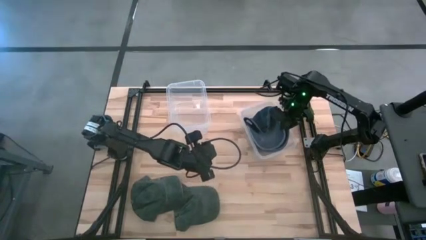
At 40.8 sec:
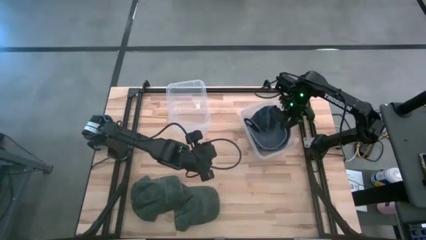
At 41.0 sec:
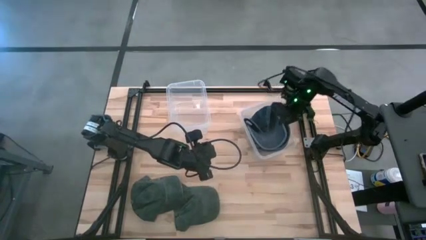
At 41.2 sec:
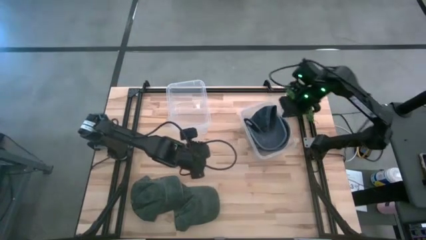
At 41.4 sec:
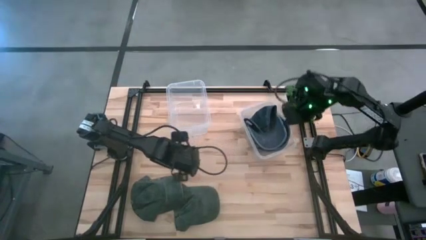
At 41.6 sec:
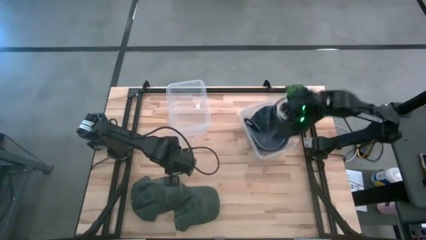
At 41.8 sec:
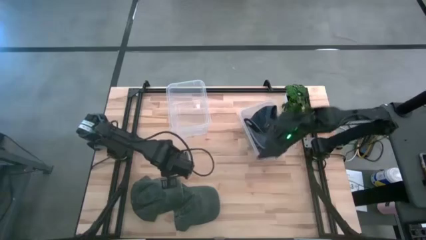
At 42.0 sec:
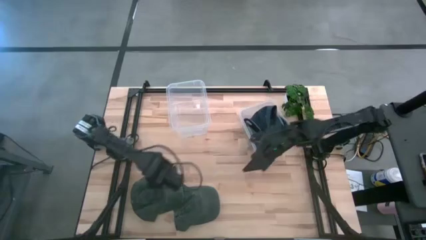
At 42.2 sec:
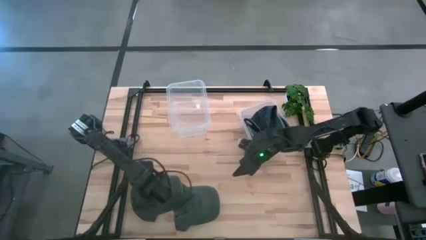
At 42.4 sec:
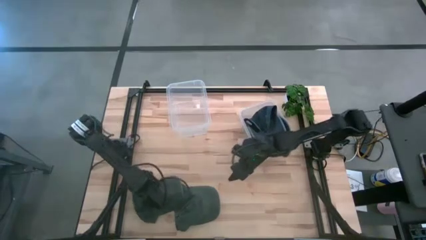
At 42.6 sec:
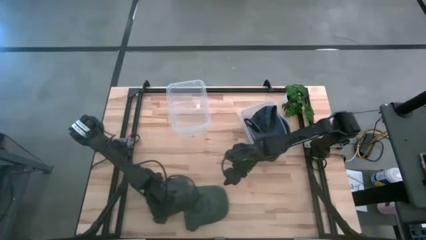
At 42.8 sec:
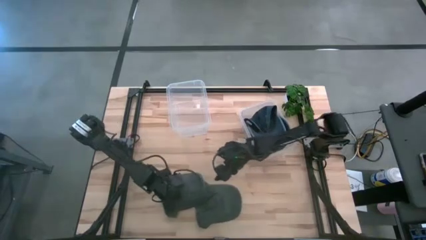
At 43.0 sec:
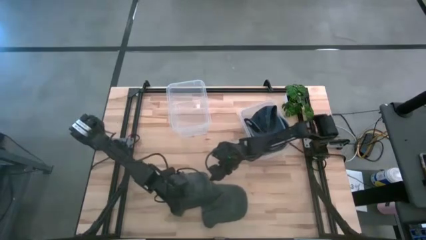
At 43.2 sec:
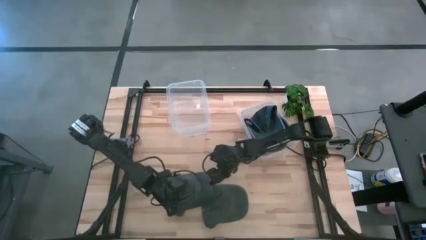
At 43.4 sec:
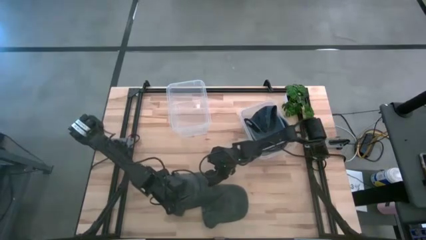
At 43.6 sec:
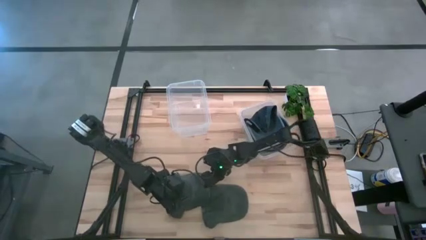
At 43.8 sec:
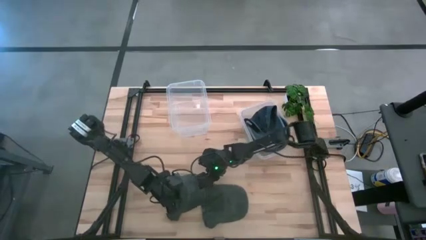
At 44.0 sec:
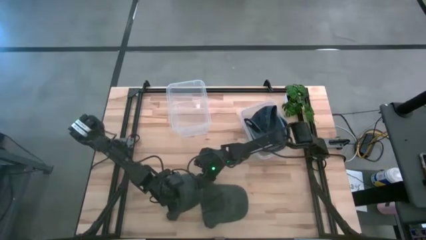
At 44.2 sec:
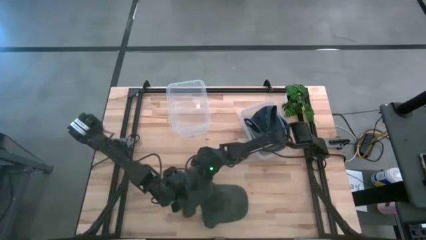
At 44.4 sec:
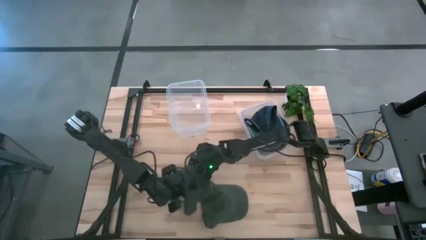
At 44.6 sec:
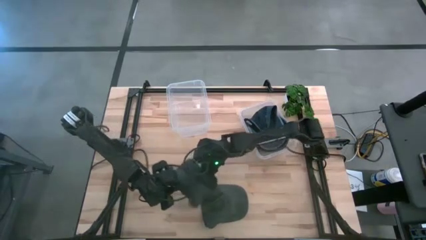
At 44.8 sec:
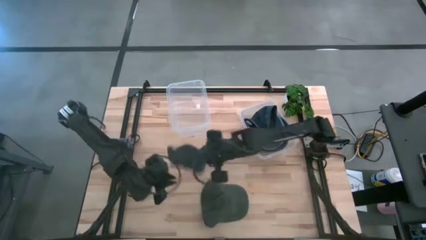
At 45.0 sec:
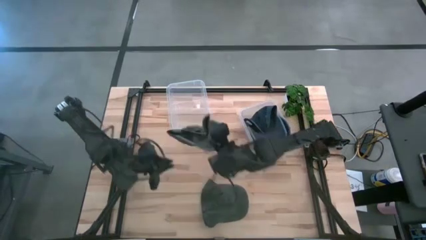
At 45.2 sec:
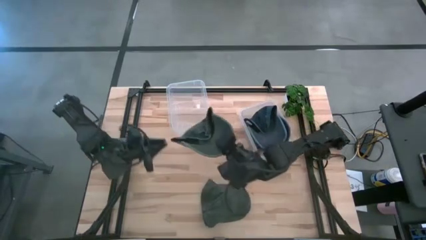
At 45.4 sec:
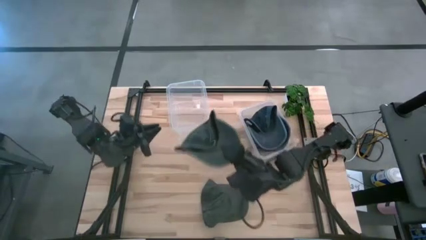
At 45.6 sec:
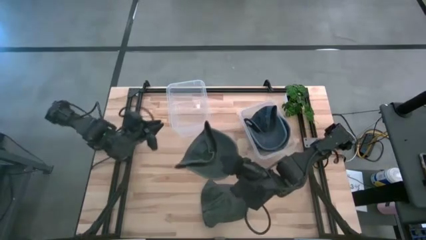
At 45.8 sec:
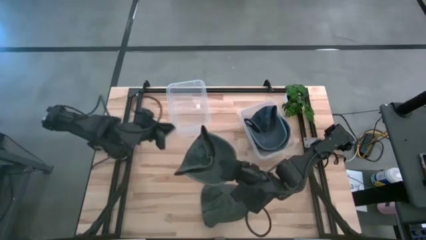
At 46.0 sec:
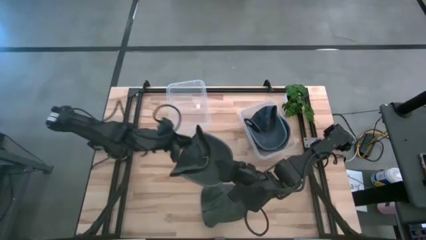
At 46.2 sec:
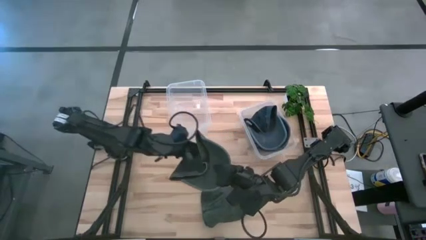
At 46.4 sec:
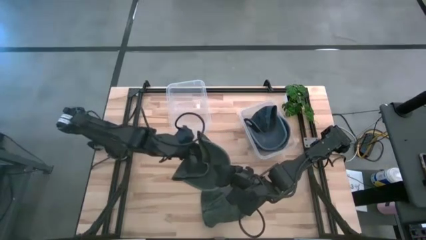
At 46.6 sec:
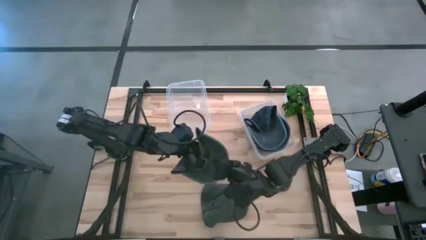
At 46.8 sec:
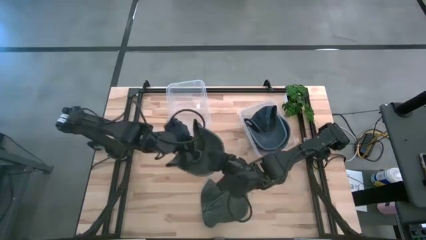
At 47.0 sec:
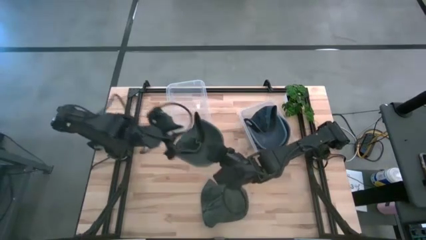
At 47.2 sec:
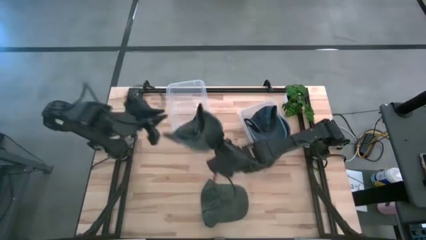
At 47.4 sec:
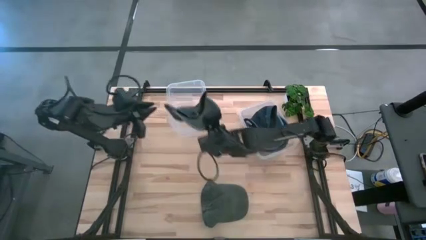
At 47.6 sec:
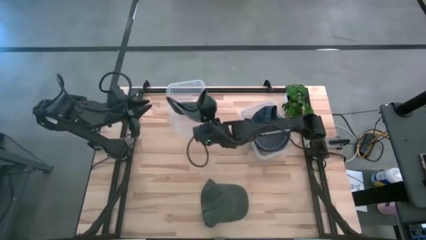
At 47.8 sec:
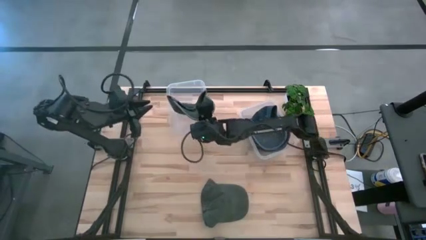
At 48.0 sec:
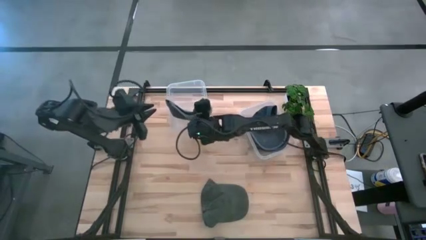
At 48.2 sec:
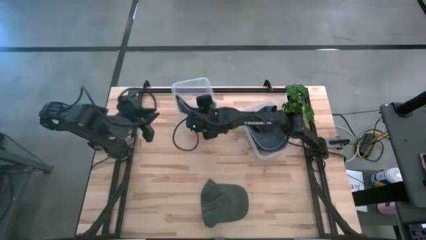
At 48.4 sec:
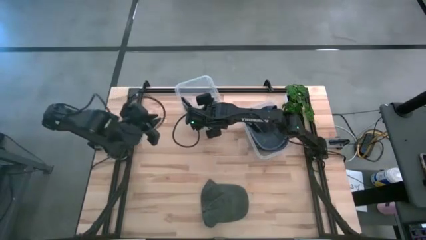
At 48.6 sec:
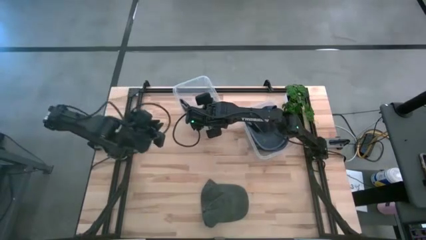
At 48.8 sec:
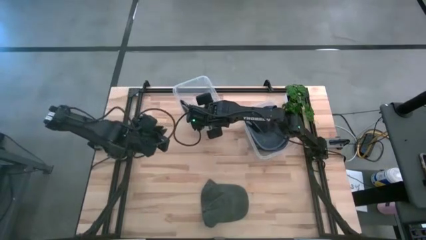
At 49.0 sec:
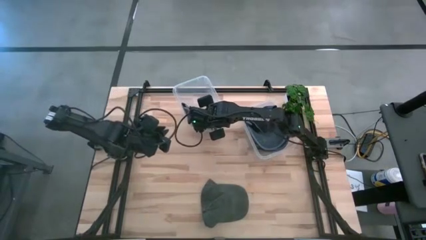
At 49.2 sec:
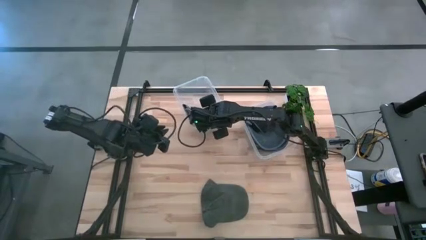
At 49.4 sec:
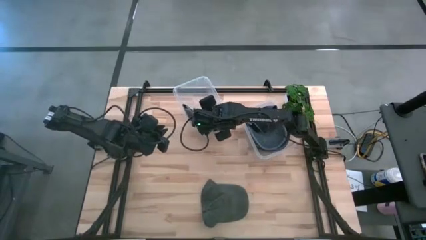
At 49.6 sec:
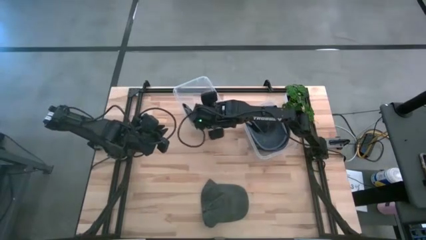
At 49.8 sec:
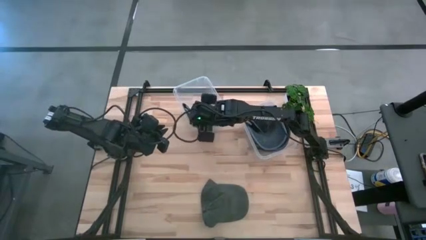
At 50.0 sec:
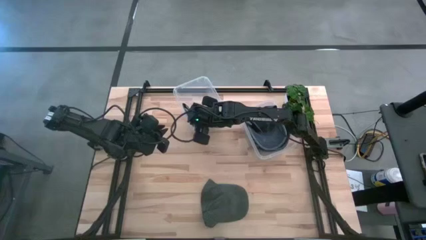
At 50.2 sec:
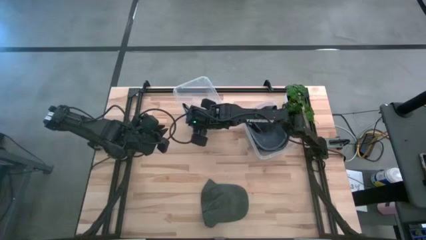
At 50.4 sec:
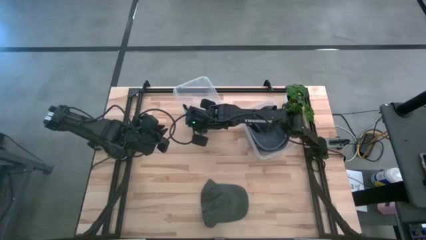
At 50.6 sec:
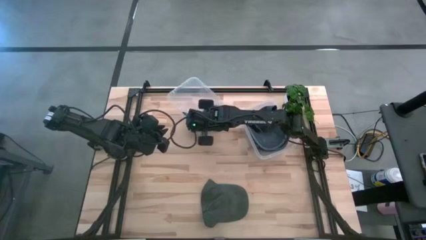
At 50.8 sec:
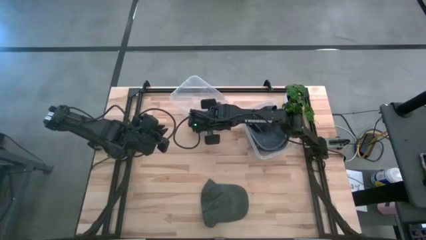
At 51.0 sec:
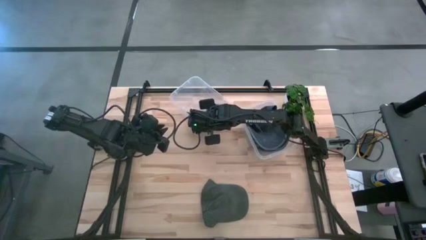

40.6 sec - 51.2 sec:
Task: Pick & Place hat
Put the left green cap into the left transparent bin

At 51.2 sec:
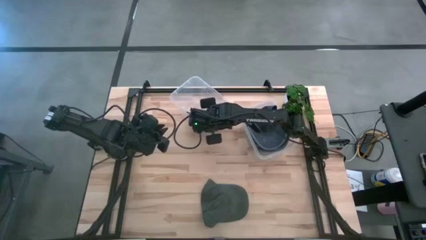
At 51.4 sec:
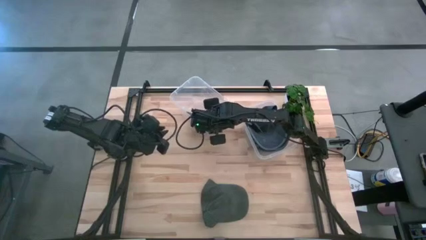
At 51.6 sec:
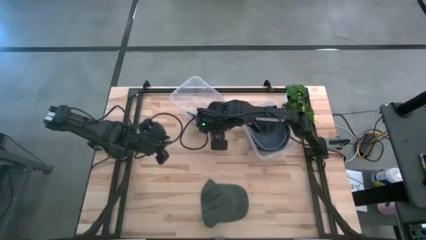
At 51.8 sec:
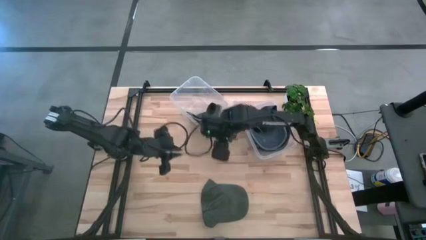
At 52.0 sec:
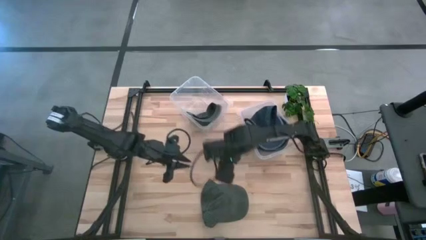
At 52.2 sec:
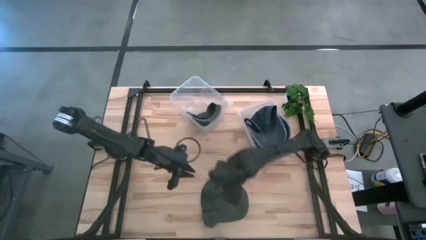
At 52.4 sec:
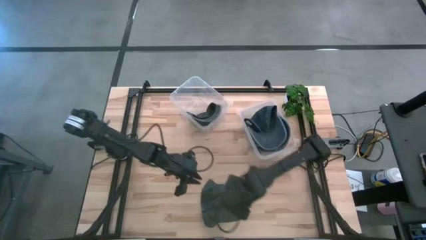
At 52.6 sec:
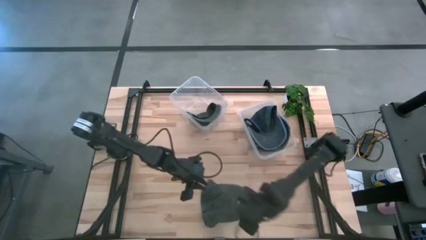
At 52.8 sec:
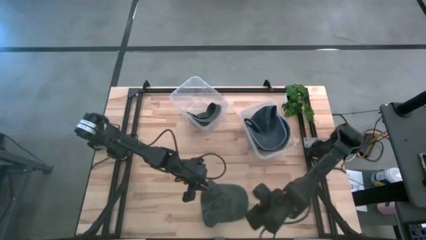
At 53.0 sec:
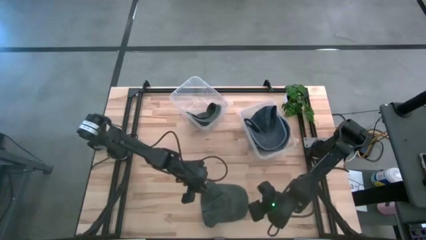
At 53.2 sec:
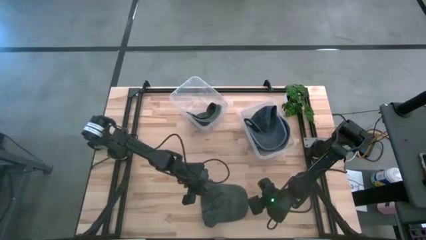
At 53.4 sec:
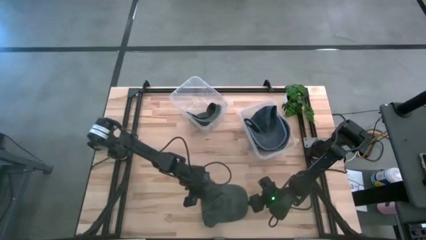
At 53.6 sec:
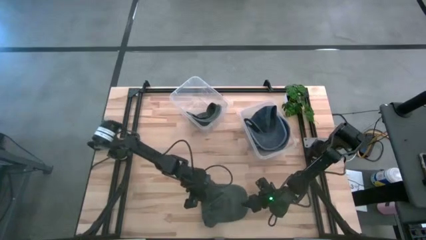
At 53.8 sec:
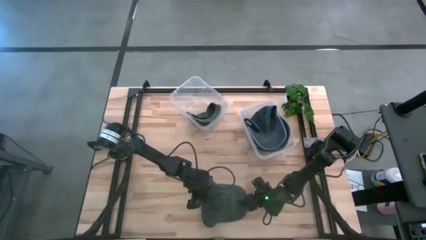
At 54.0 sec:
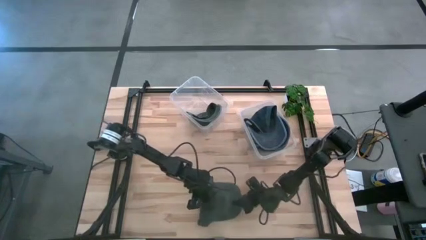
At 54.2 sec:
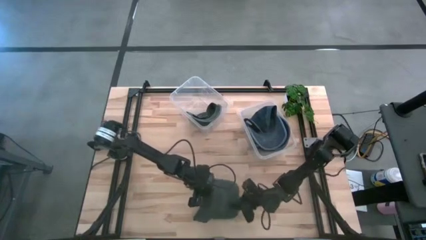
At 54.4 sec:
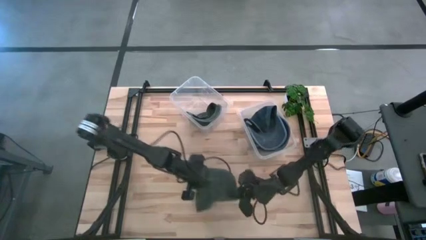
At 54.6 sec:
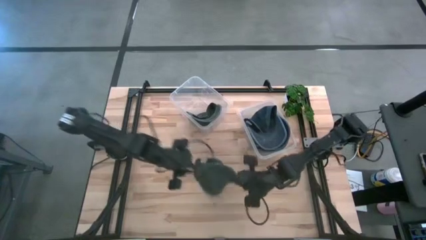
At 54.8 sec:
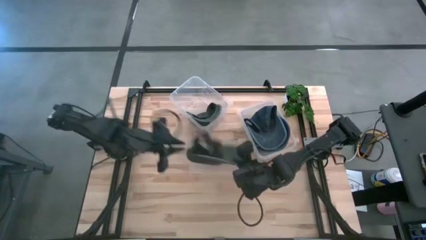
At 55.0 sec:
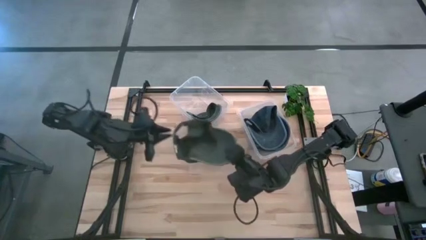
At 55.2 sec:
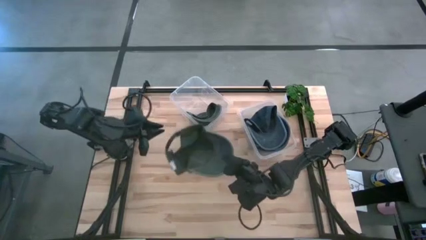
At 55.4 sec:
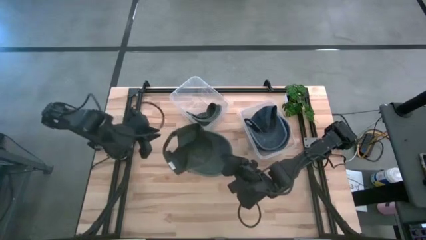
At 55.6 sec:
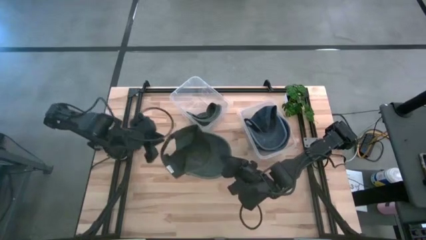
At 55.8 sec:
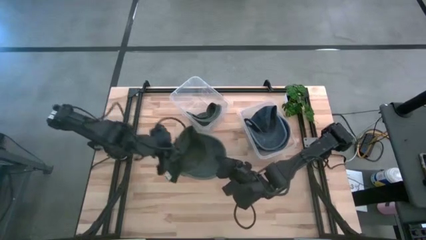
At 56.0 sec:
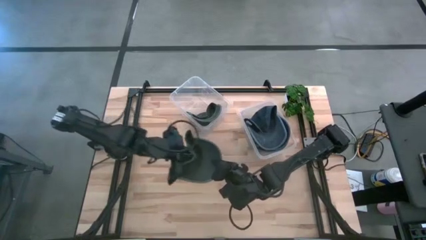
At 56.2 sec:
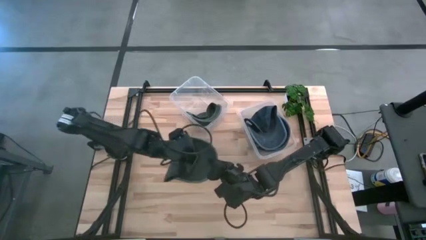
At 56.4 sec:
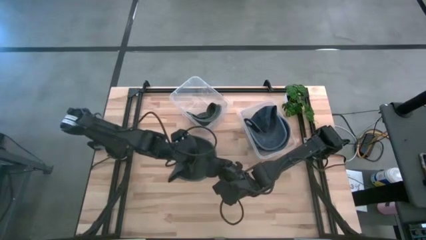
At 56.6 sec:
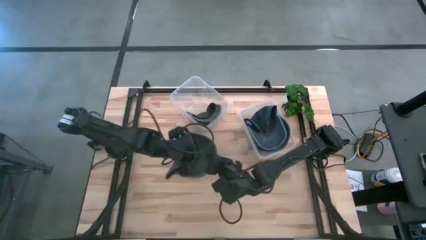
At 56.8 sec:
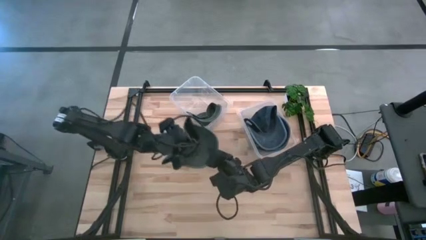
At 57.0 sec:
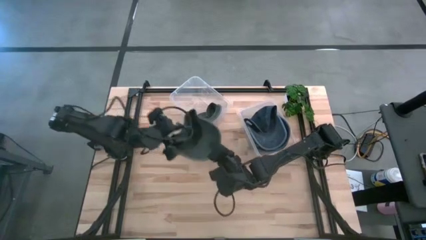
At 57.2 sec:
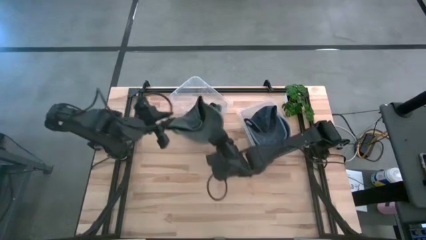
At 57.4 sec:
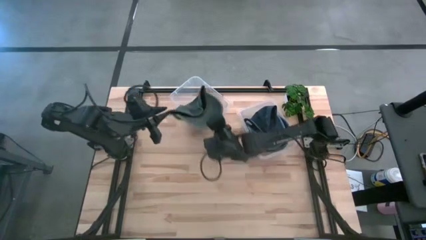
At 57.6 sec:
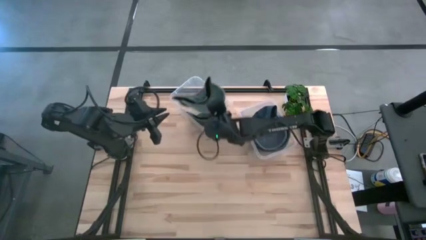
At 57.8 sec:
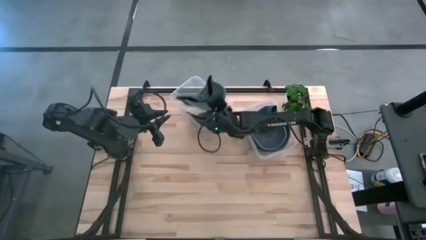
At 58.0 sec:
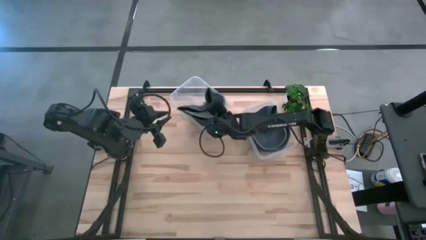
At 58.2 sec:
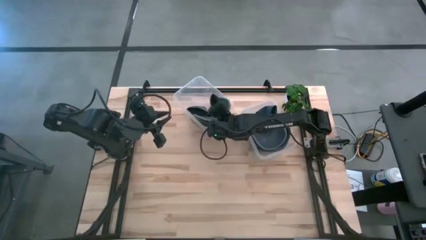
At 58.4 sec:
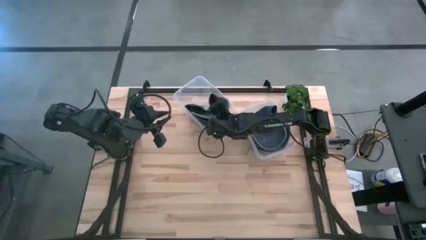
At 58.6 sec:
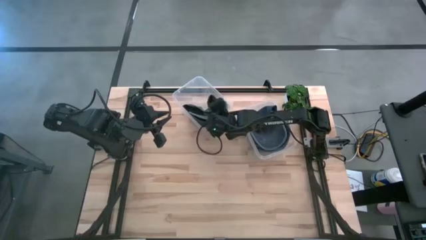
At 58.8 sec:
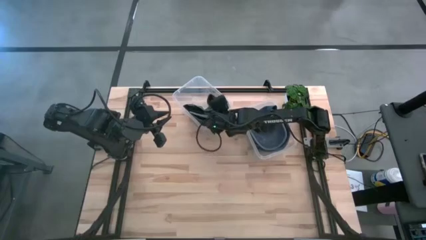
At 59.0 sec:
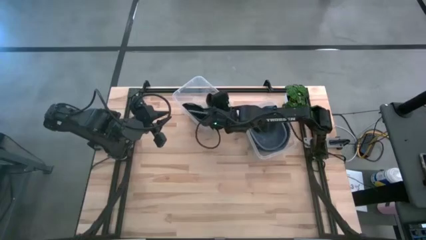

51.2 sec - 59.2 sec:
Put the green cap into the left transparent bin
